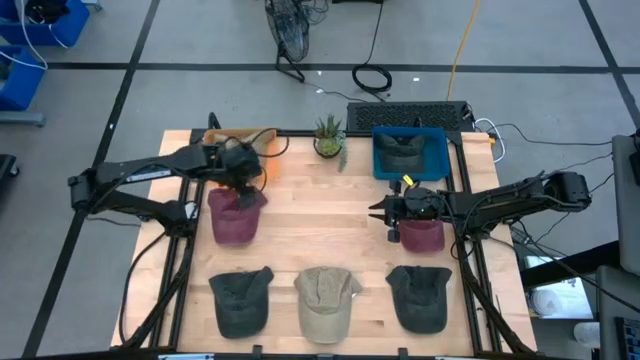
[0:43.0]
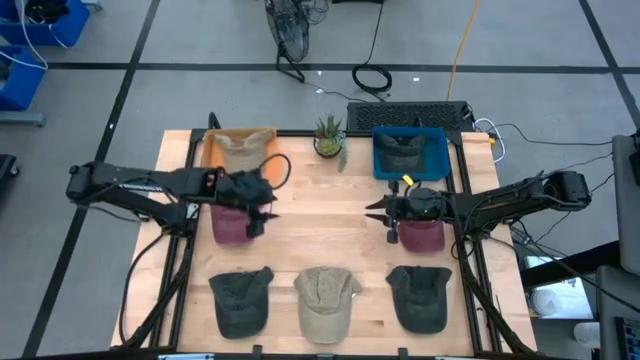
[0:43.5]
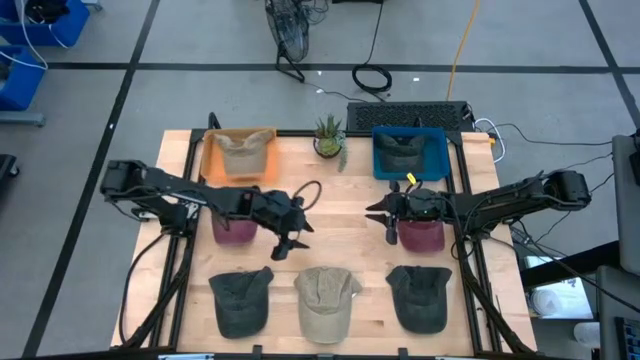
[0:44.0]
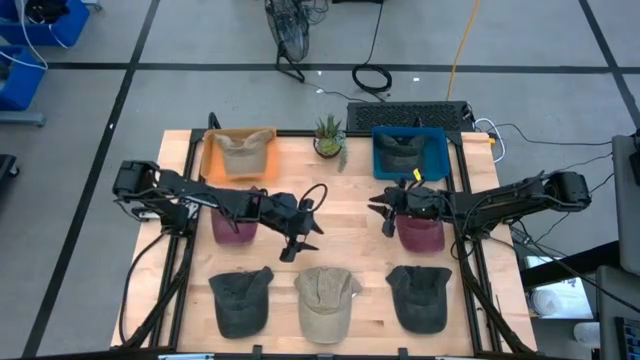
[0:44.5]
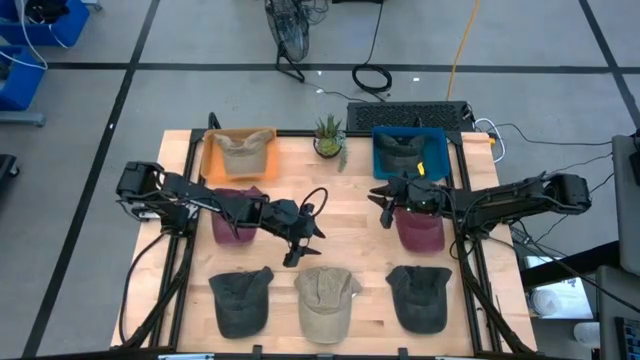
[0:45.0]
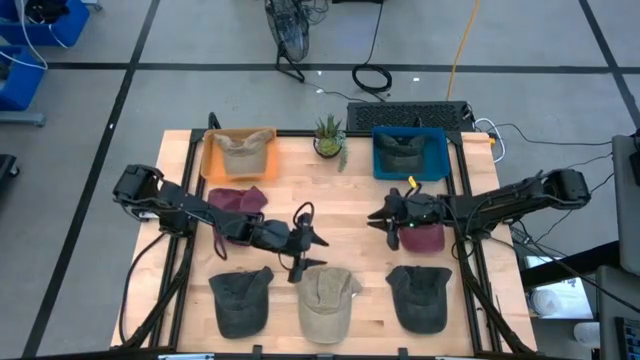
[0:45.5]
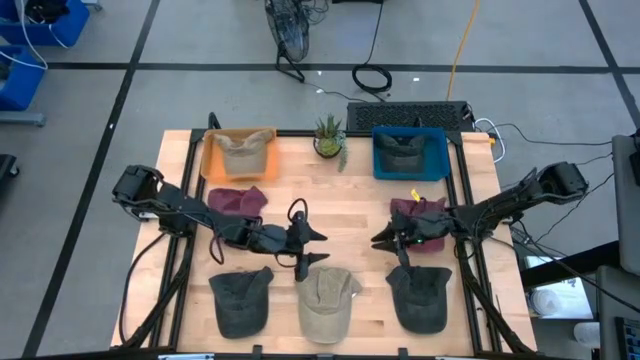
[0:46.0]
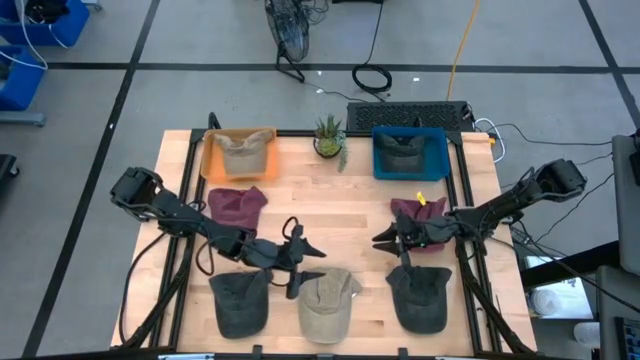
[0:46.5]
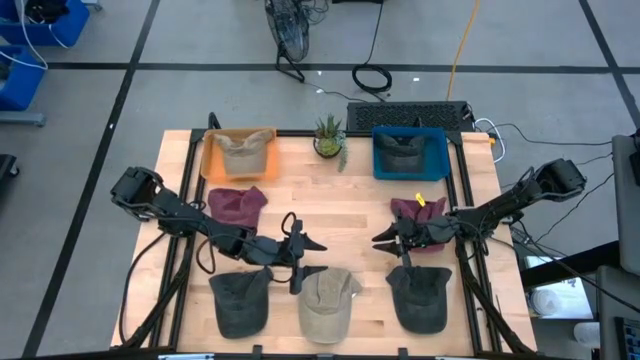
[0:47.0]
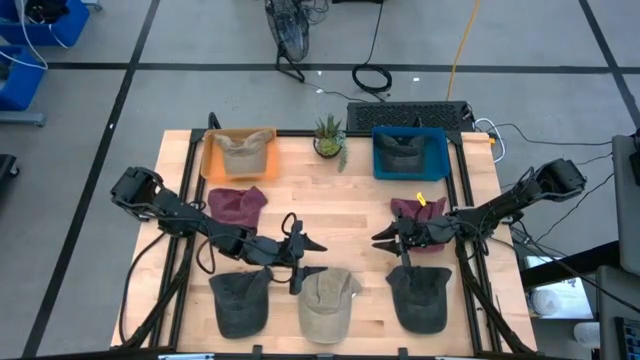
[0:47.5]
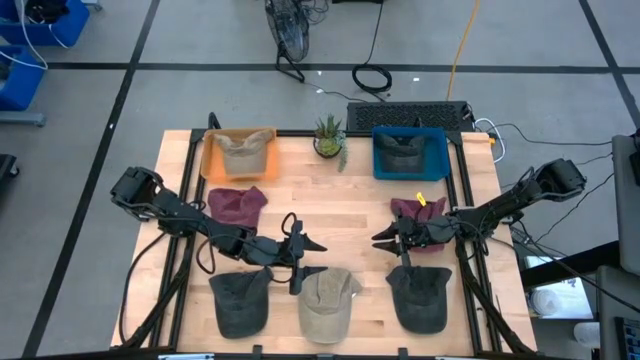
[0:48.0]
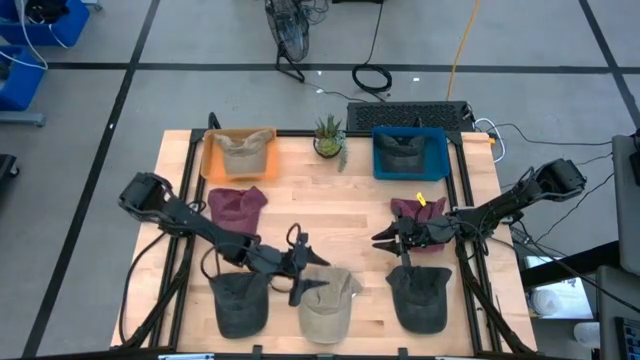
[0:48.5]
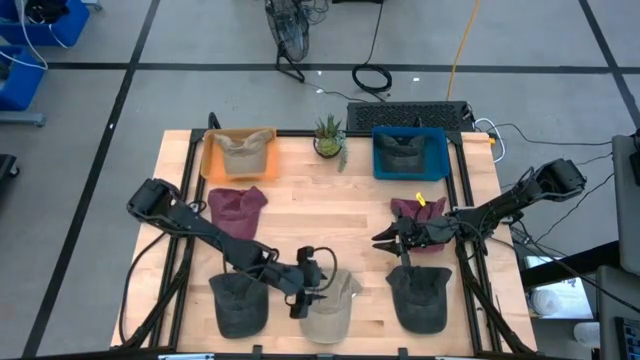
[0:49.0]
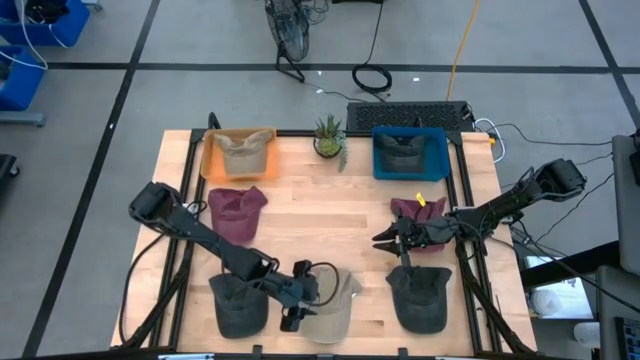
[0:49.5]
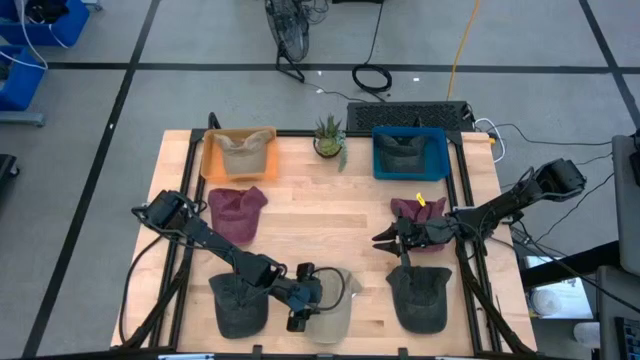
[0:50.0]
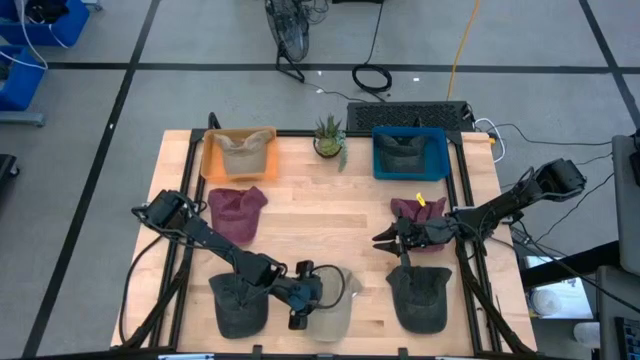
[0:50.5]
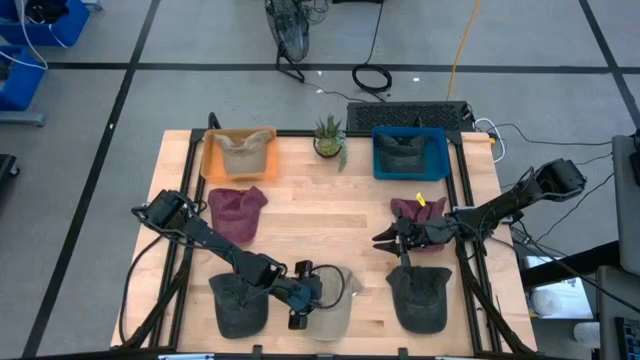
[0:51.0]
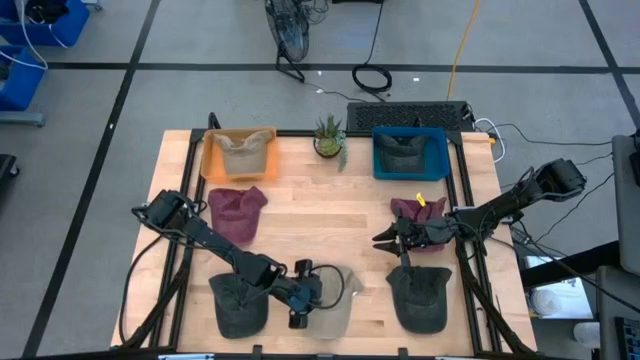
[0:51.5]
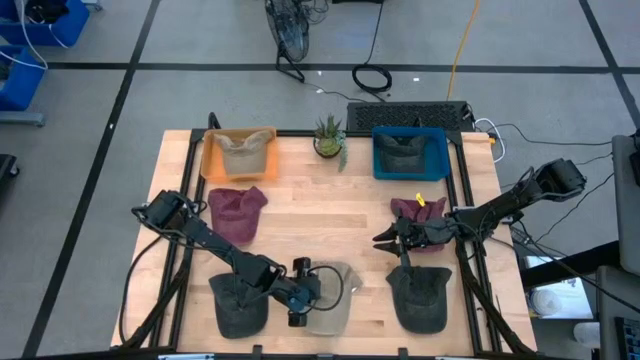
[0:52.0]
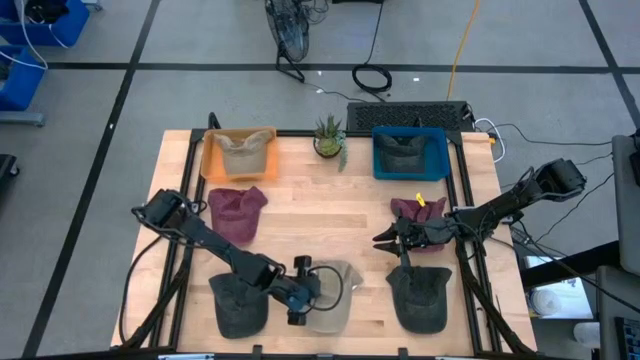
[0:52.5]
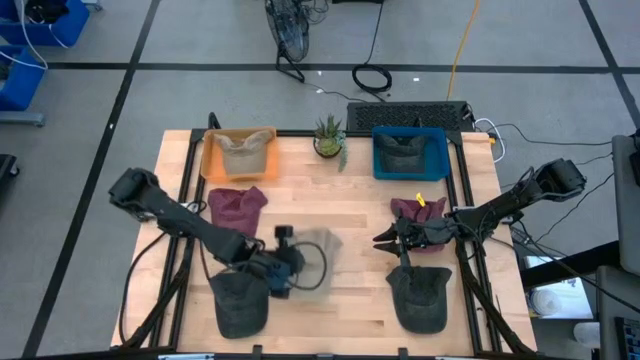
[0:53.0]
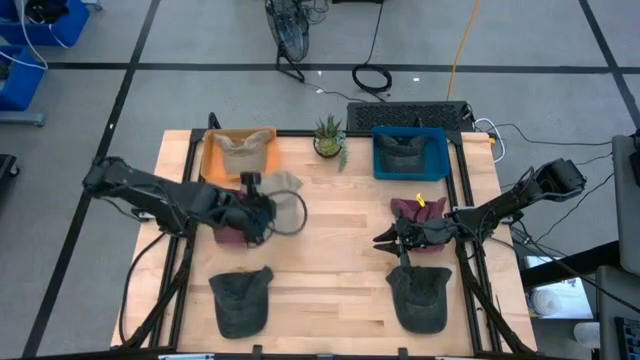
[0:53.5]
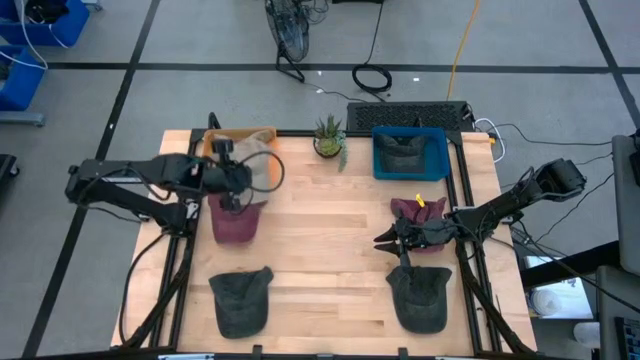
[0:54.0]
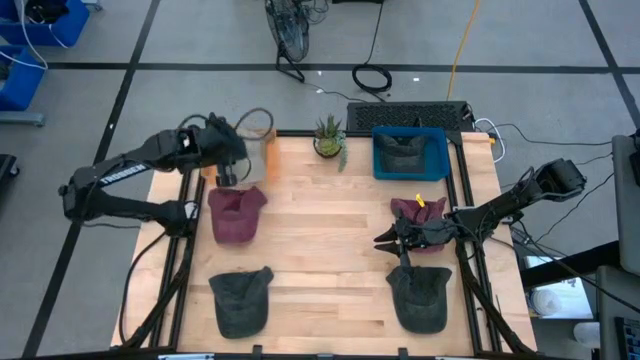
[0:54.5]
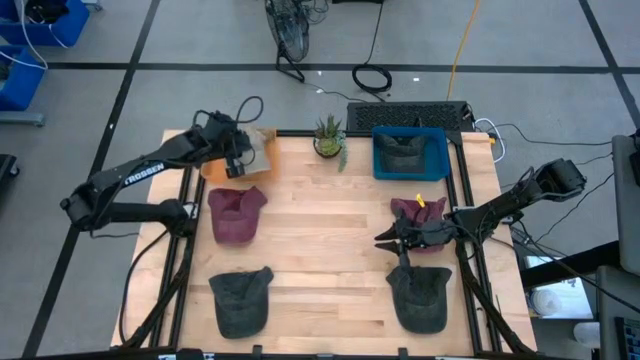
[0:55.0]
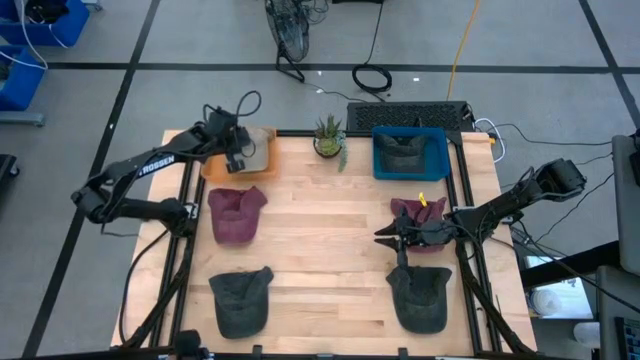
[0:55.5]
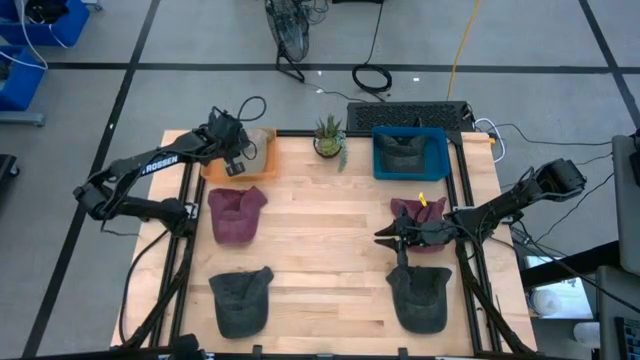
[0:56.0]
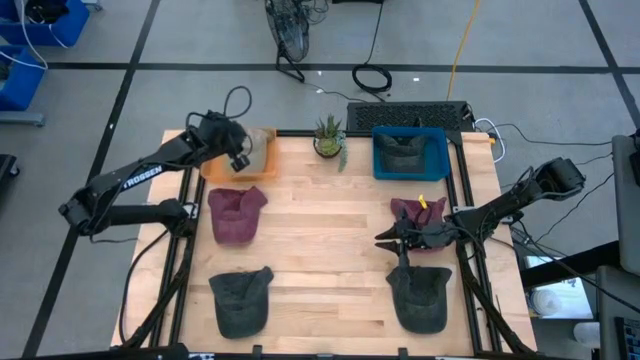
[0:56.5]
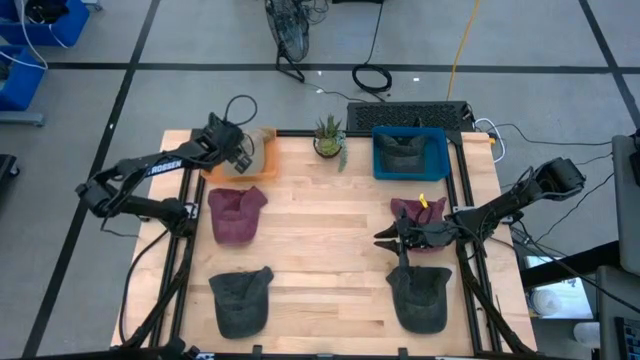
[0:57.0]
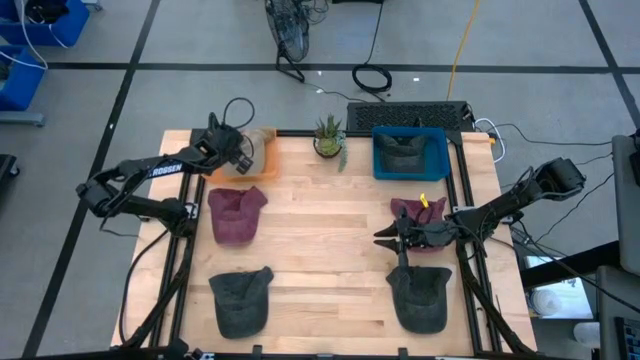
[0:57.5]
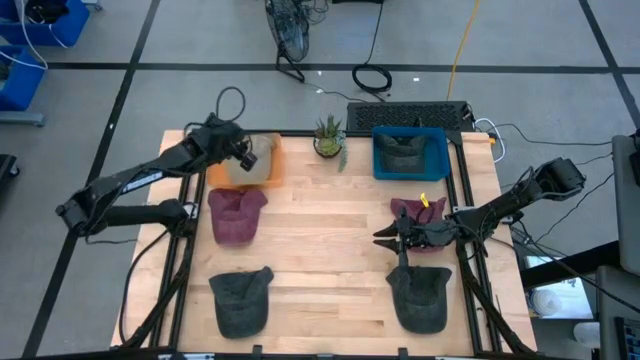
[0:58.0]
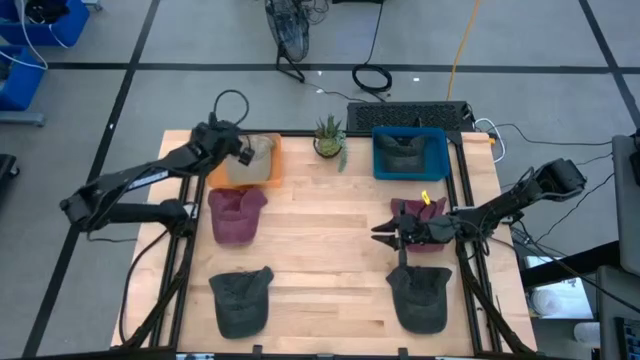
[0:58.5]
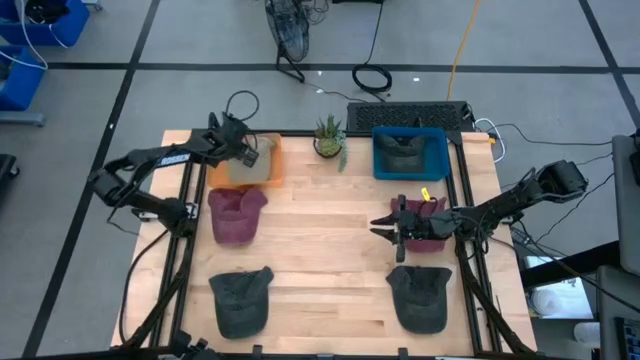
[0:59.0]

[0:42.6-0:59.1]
Task: Pick & Place hat
Put the brown cap into the orange bin

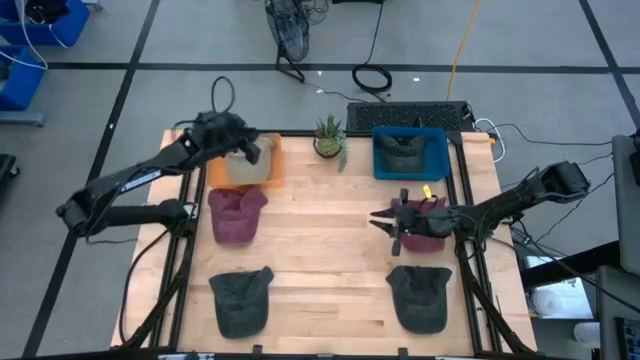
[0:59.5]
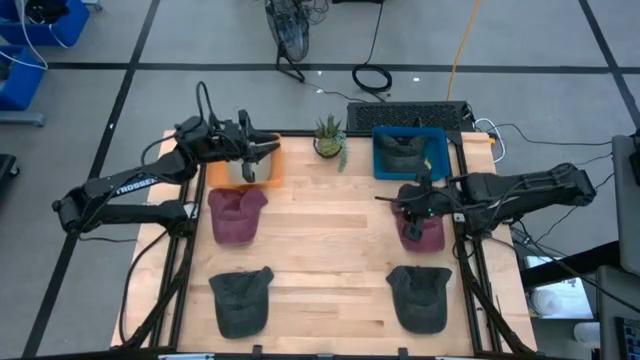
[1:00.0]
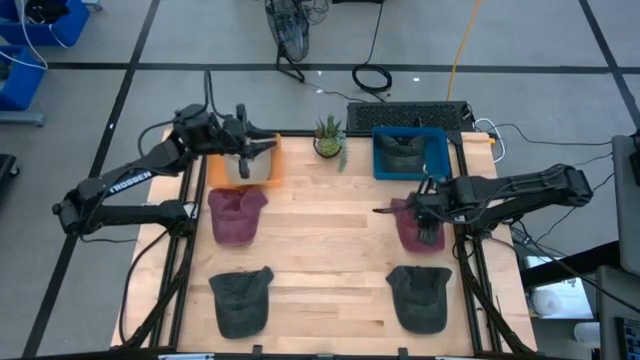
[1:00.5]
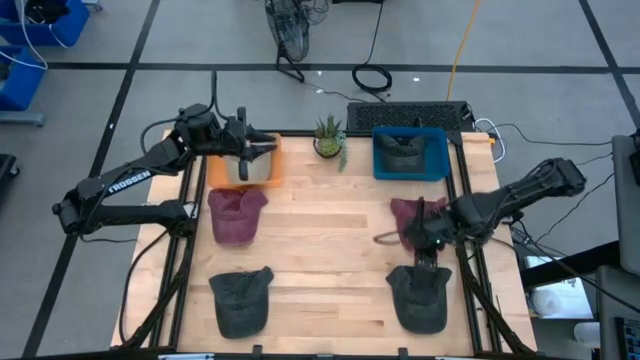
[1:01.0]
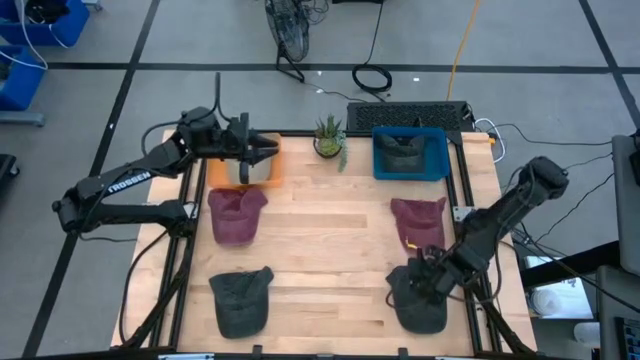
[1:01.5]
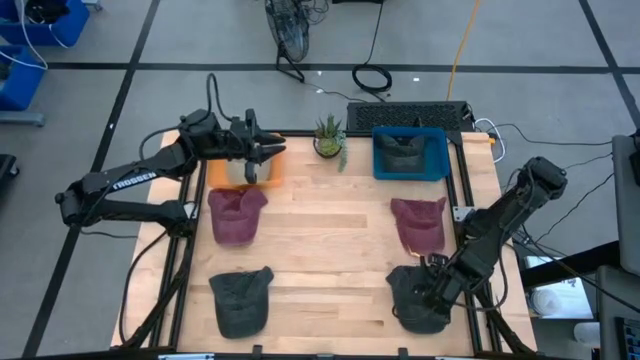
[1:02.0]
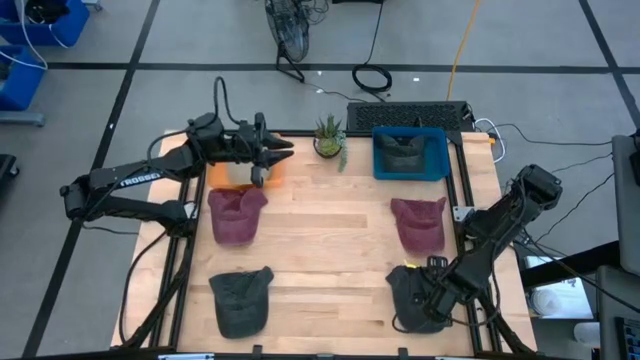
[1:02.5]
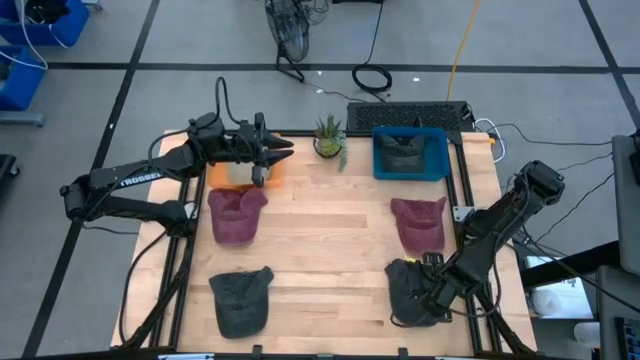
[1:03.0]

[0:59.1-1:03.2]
Put the right black cap into the blue bin
